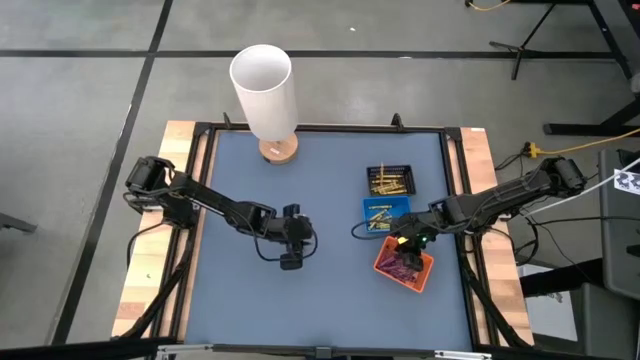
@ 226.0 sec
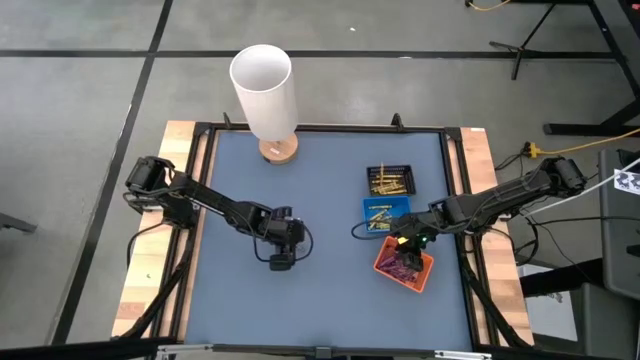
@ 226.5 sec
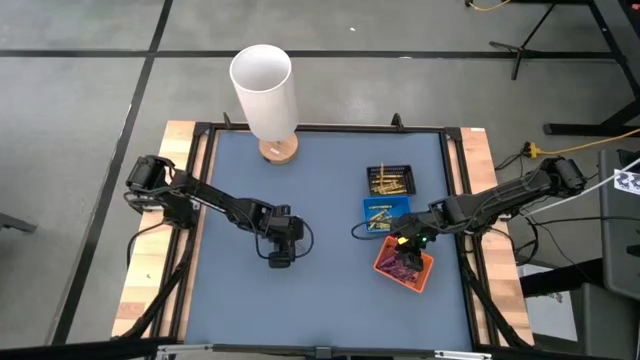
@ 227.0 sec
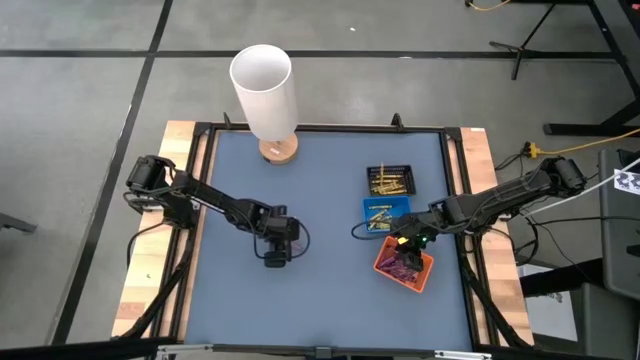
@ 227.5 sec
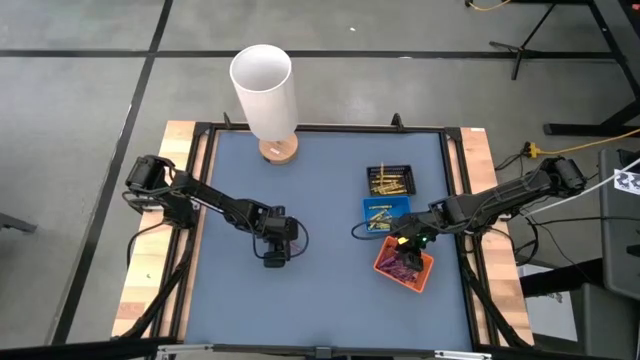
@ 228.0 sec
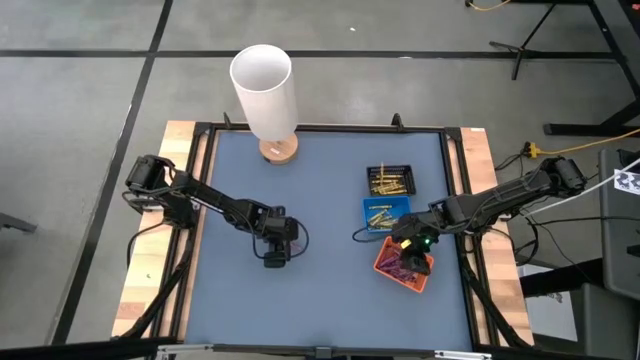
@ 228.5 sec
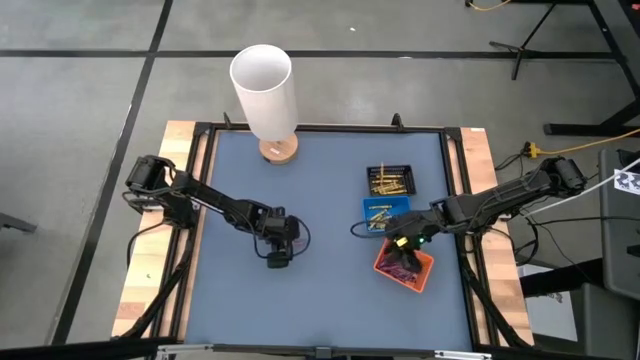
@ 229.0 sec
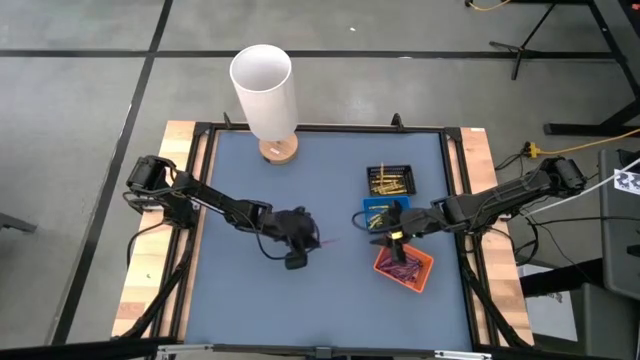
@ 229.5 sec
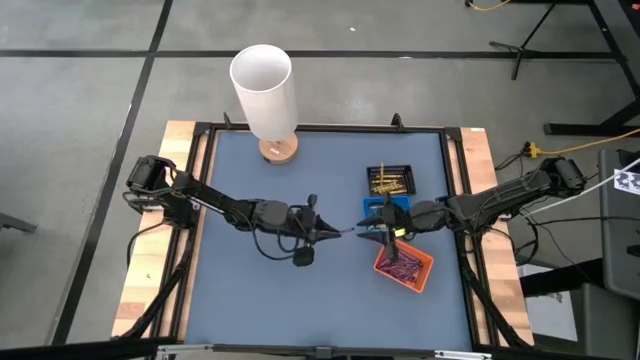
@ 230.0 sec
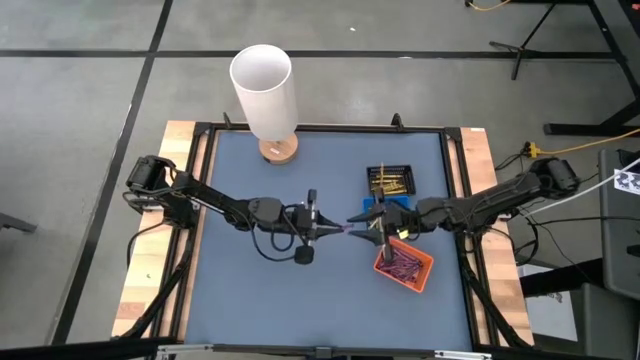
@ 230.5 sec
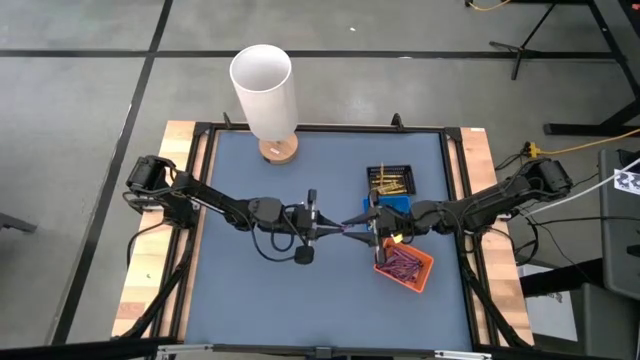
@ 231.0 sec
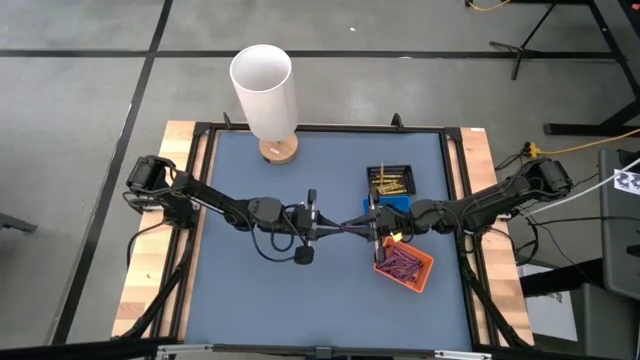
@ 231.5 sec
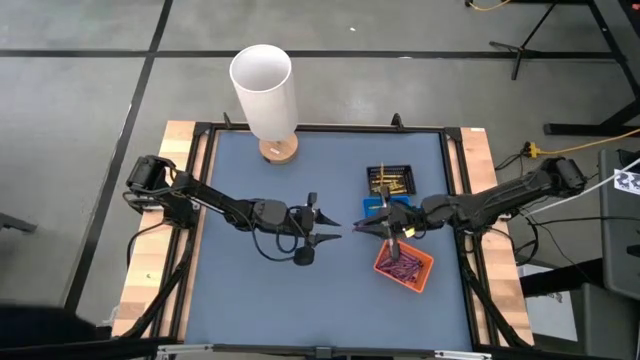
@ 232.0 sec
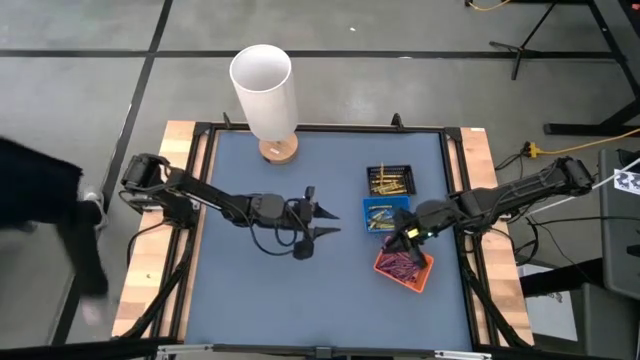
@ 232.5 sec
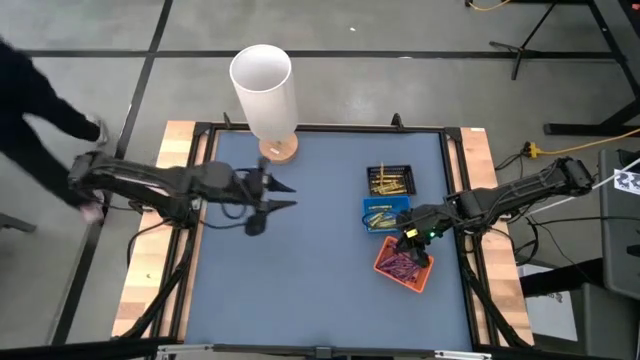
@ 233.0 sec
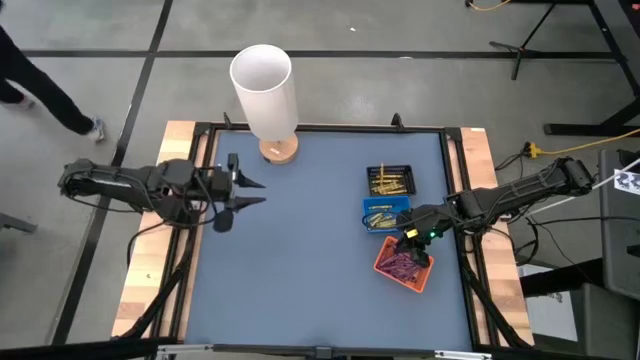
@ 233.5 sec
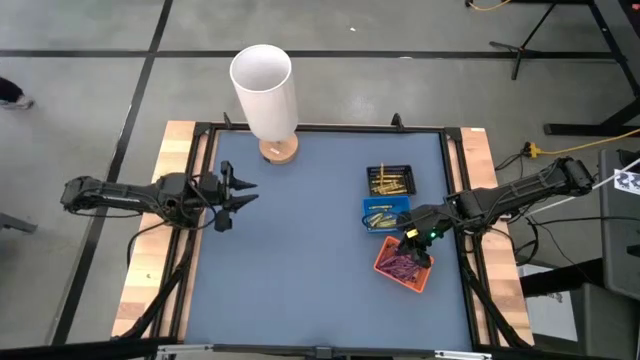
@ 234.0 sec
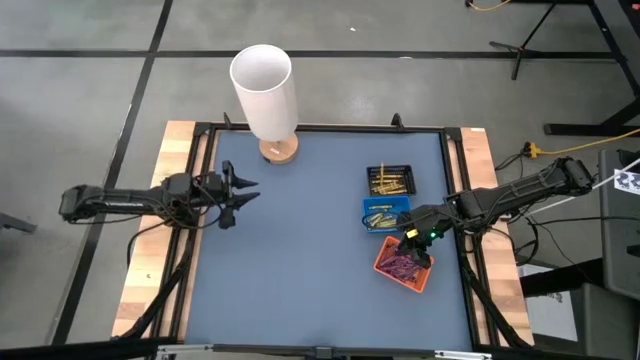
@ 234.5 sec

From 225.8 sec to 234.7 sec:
Task: Sort crayons
Put the purple crayon into the orange bin

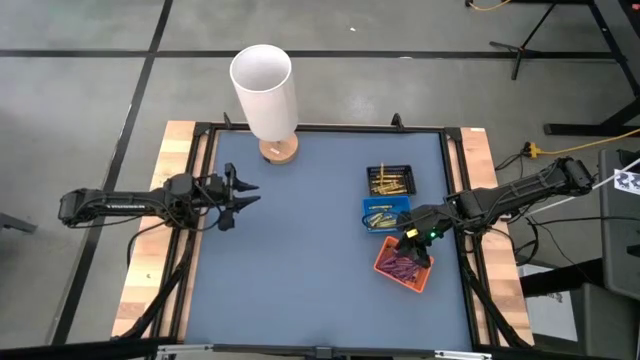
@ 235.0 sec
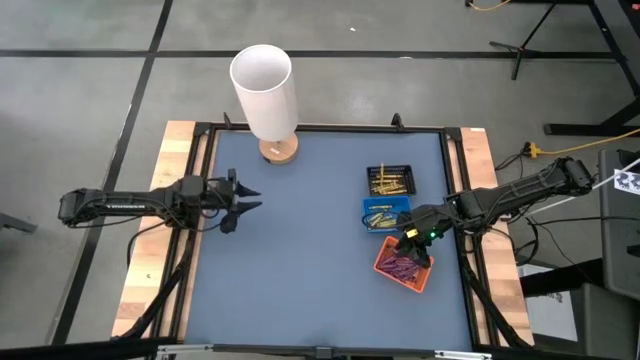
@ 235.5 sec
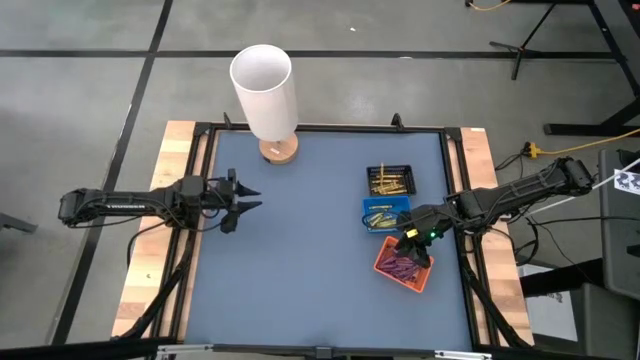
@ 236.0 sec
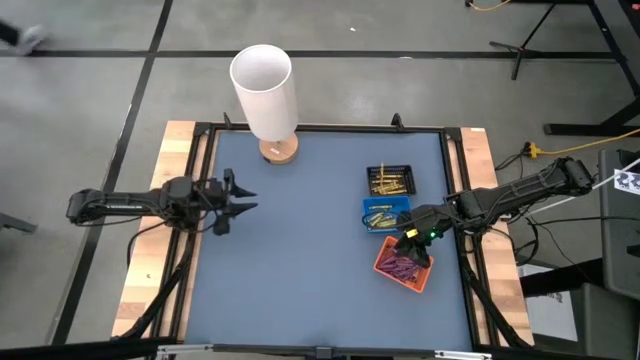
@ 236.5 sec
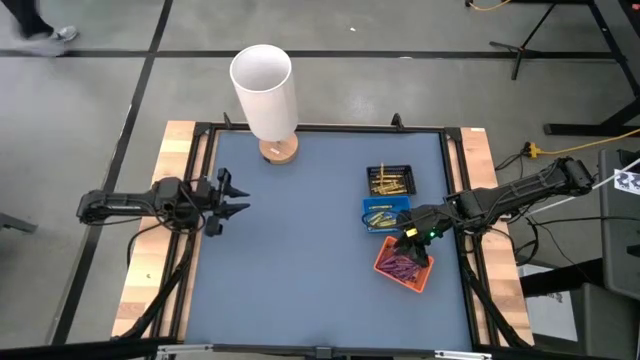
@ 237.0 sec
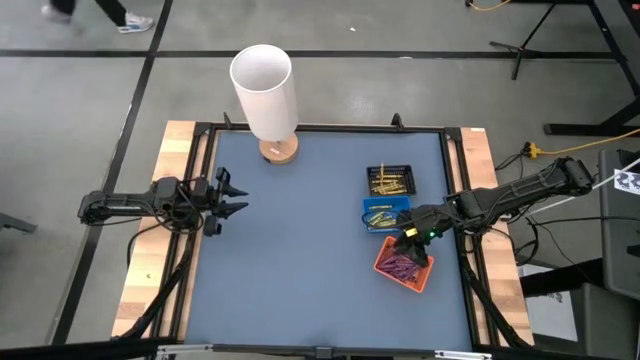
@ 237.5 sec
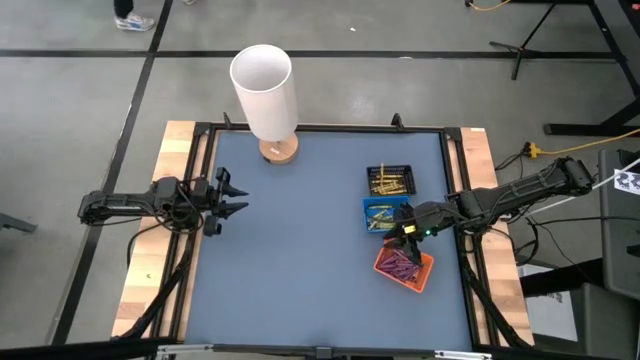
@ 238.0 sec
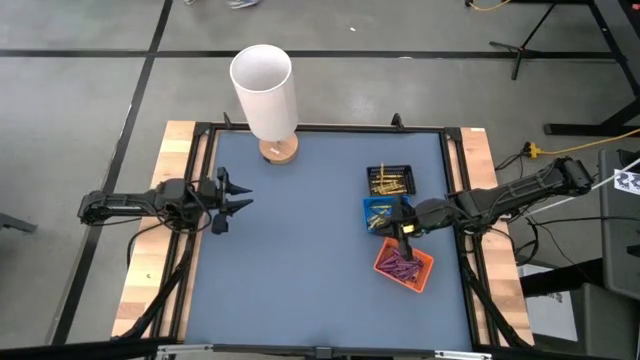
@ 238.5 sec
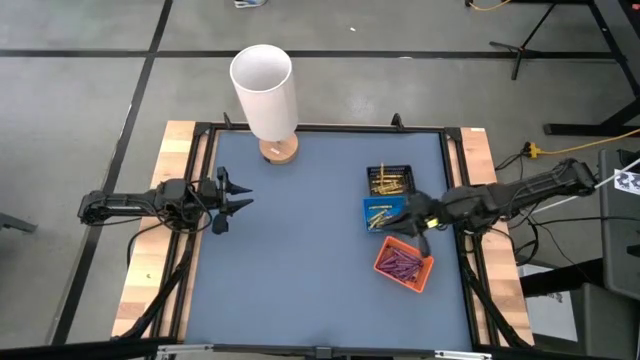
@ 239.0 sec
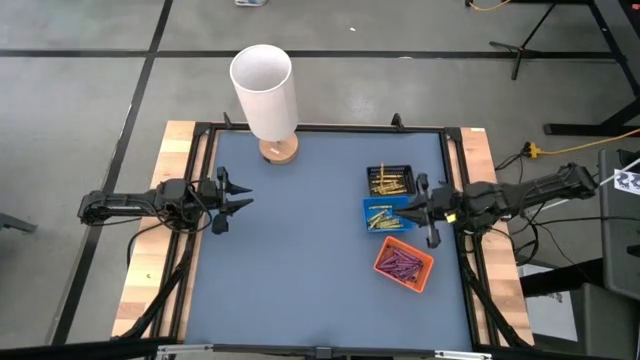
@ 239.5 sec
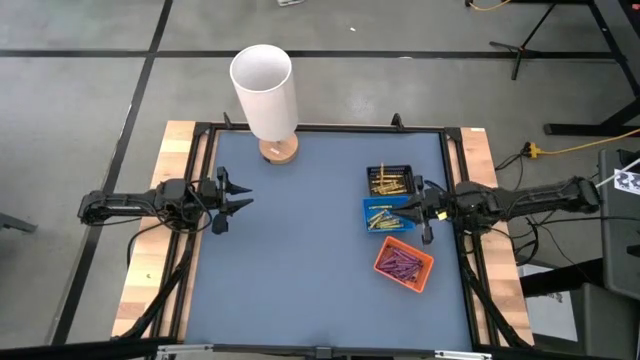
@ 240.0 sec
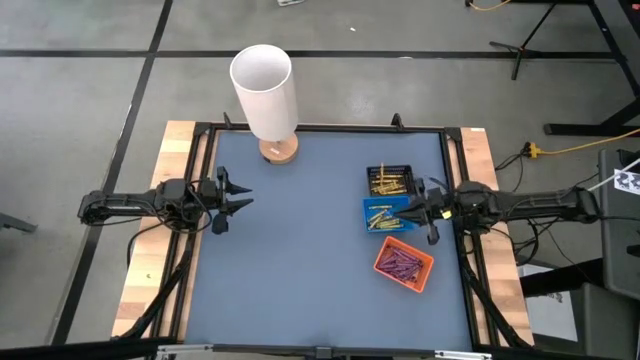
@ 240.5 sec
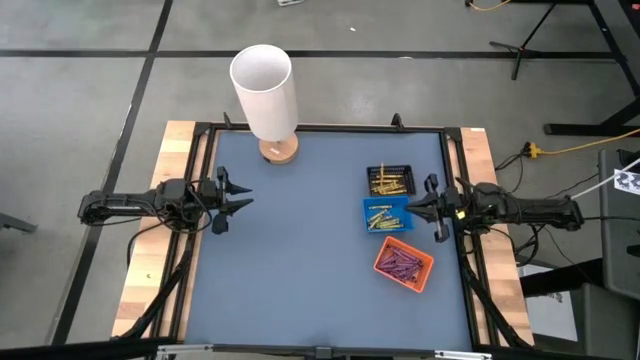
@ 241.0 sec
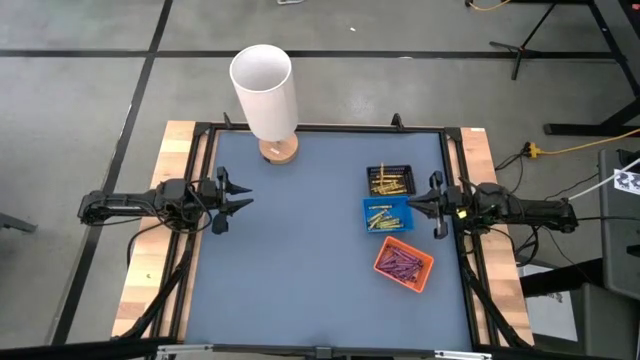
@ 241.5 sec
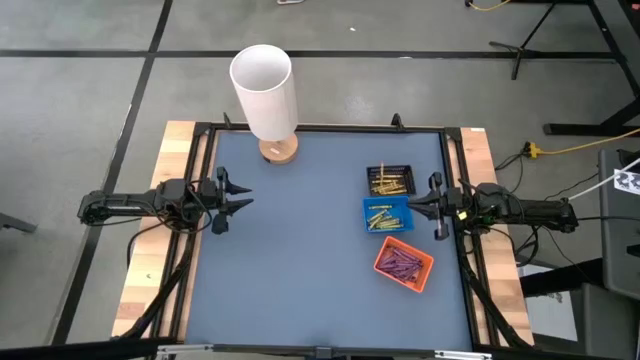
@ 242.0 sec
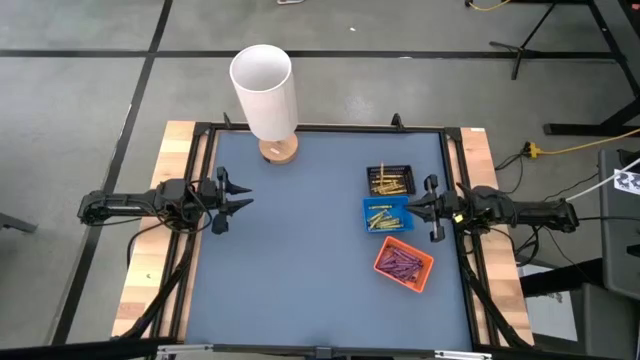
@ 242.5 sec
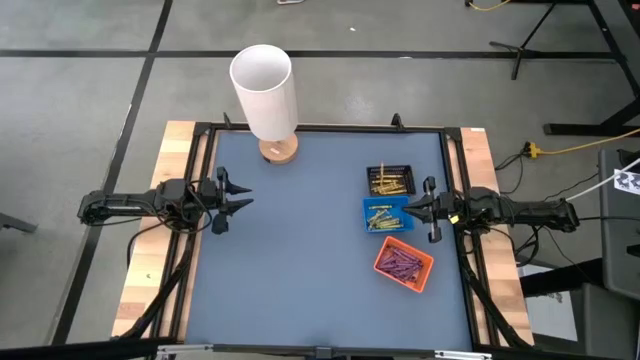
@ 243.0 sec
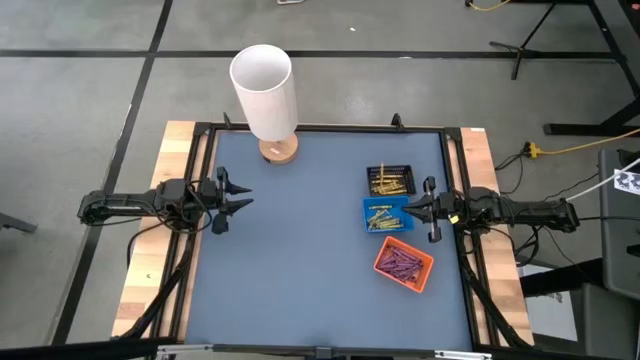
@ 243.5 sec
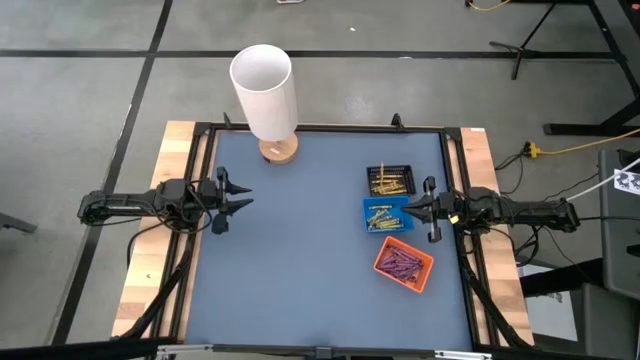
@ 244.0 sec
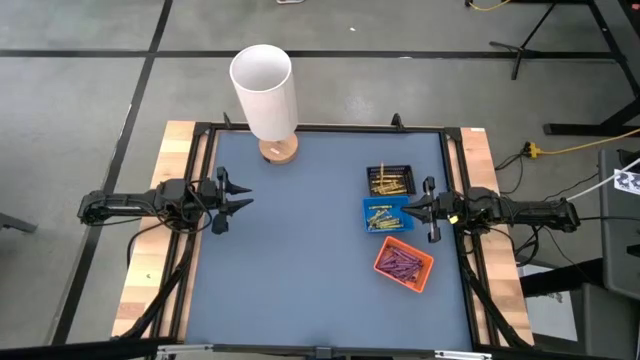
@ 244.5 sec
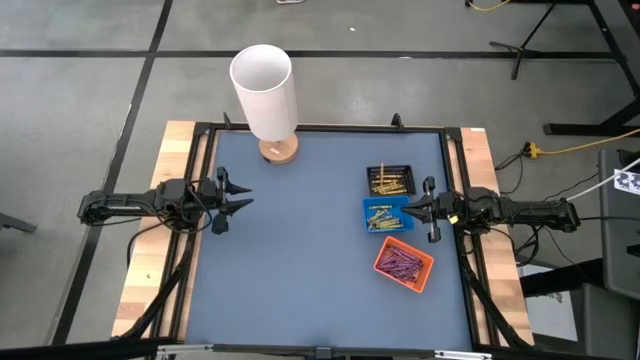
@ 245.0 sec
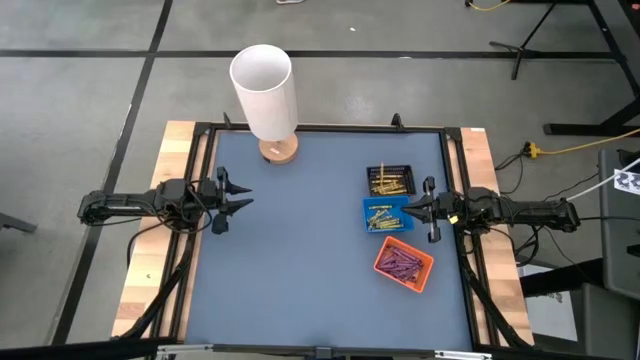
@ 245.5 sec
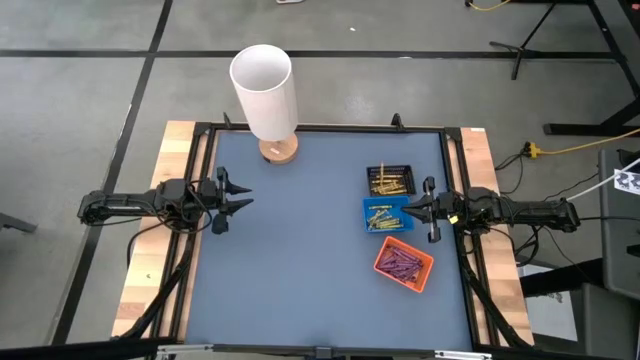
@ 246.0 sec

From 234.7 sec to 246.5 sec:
Return to Home Position
